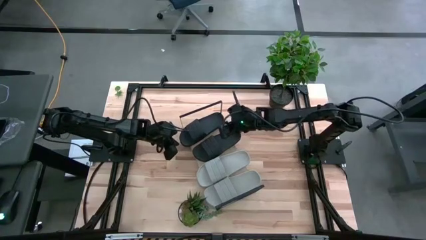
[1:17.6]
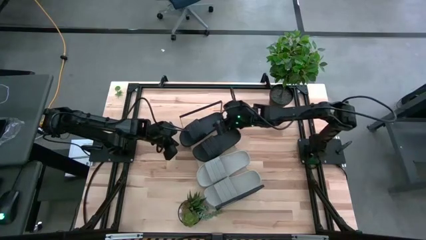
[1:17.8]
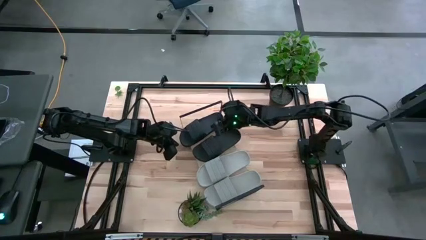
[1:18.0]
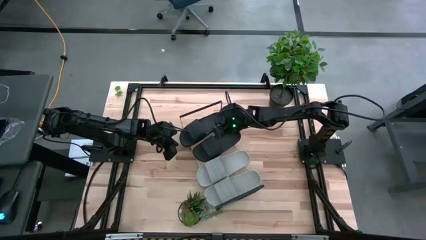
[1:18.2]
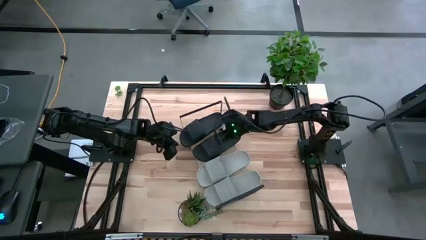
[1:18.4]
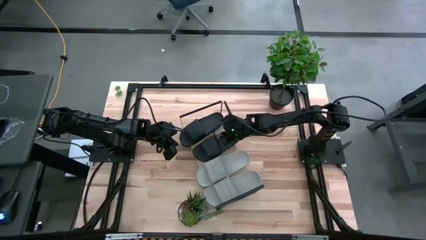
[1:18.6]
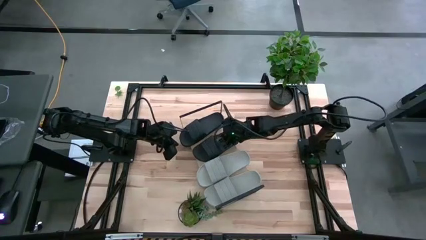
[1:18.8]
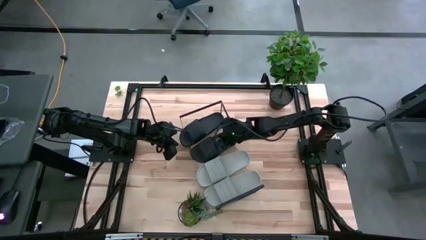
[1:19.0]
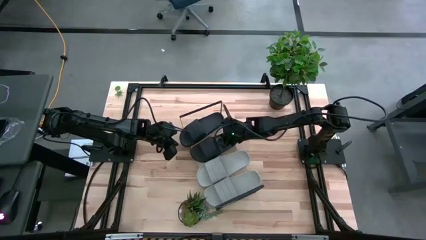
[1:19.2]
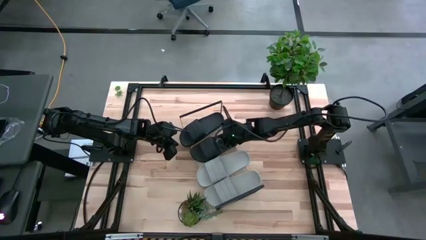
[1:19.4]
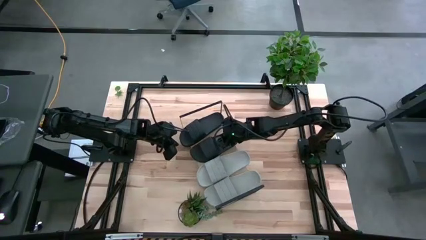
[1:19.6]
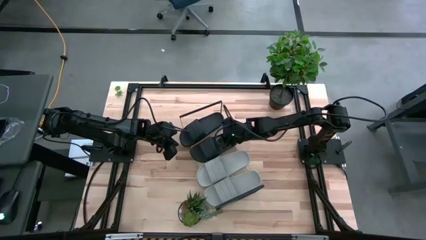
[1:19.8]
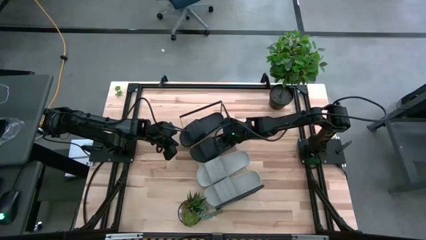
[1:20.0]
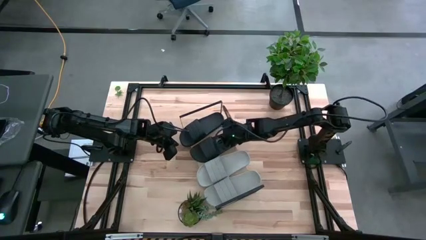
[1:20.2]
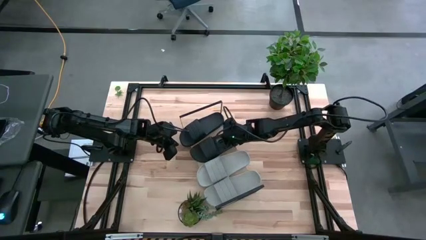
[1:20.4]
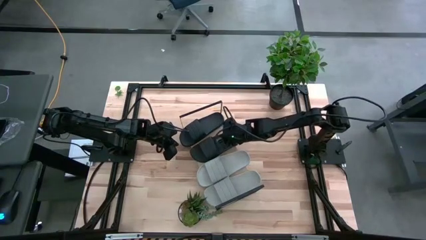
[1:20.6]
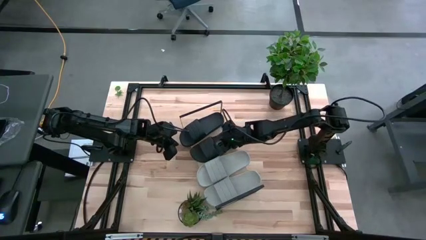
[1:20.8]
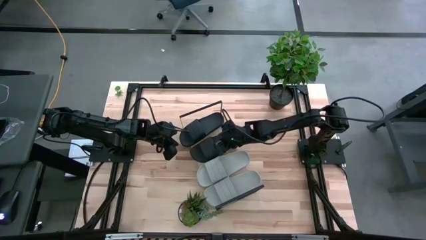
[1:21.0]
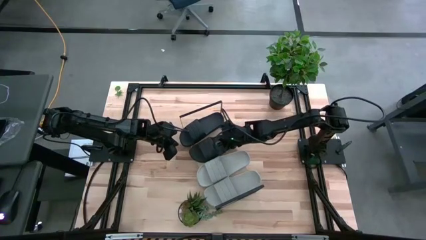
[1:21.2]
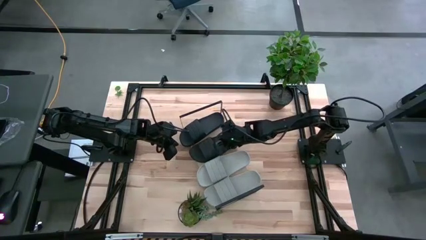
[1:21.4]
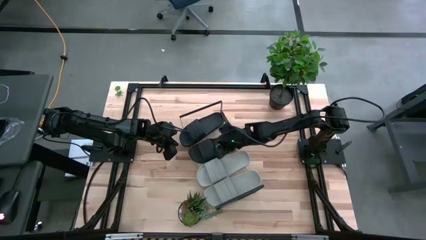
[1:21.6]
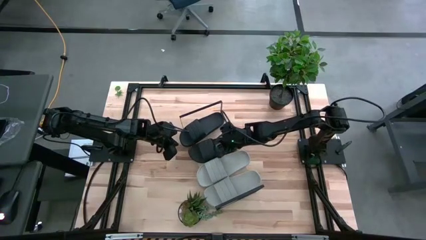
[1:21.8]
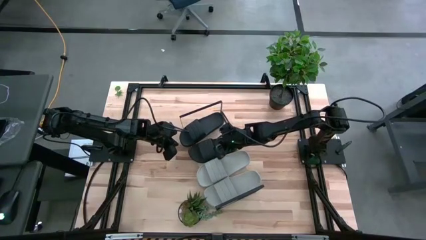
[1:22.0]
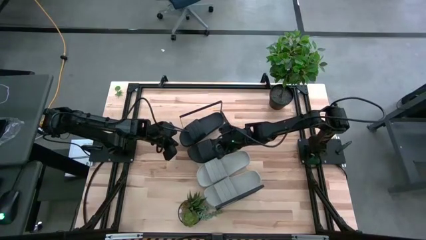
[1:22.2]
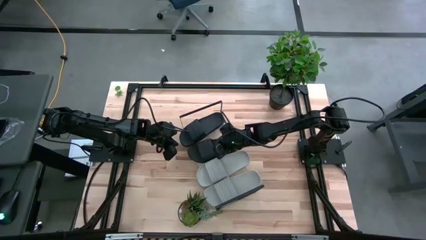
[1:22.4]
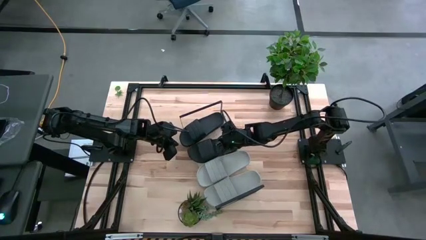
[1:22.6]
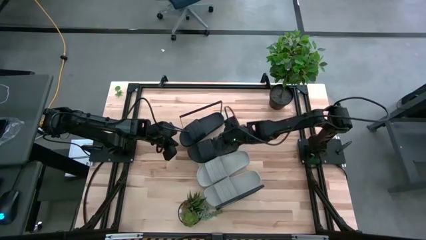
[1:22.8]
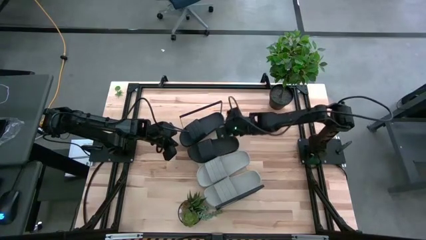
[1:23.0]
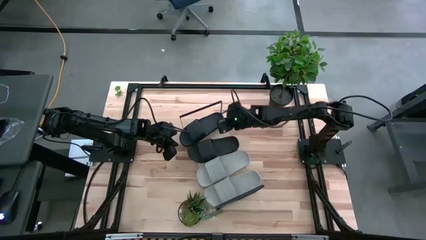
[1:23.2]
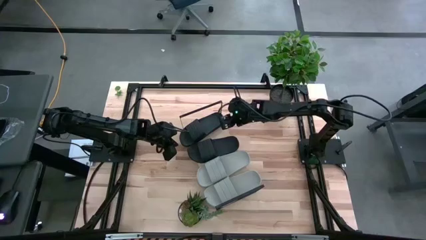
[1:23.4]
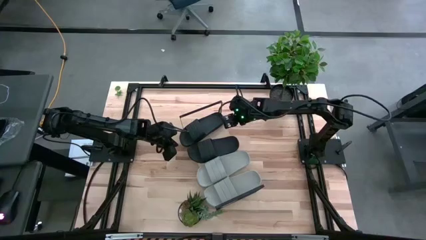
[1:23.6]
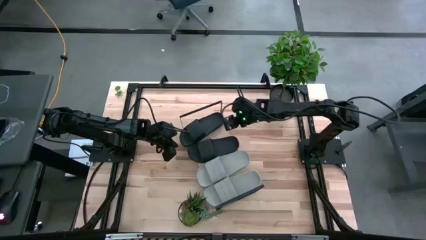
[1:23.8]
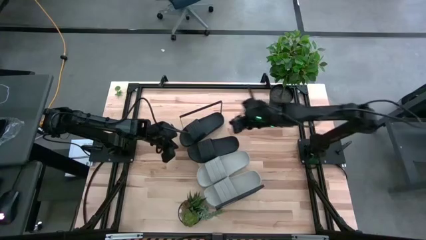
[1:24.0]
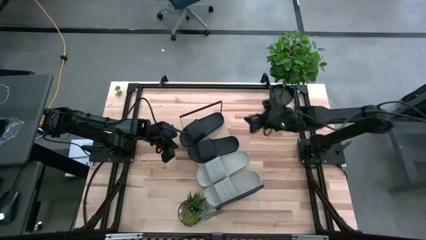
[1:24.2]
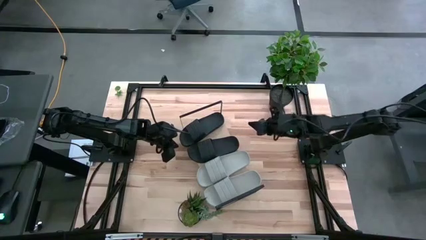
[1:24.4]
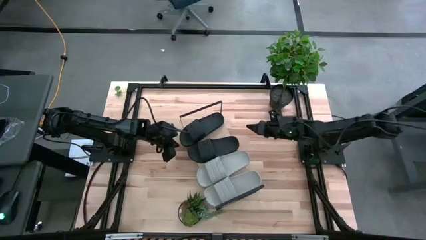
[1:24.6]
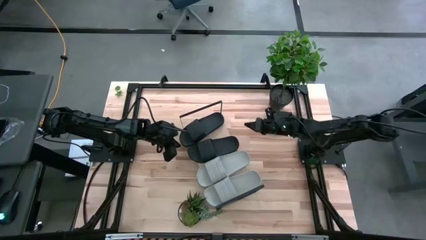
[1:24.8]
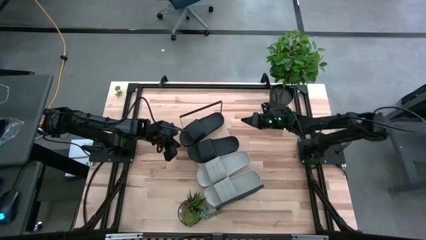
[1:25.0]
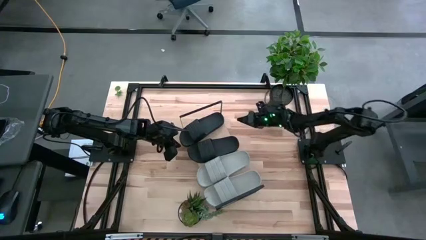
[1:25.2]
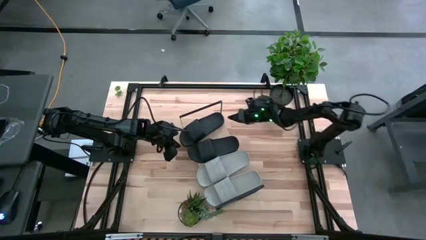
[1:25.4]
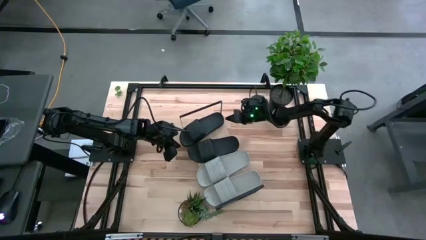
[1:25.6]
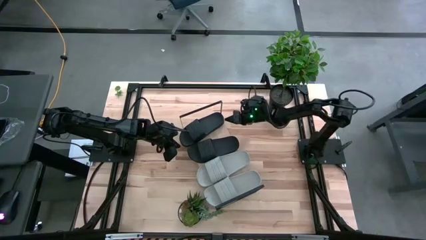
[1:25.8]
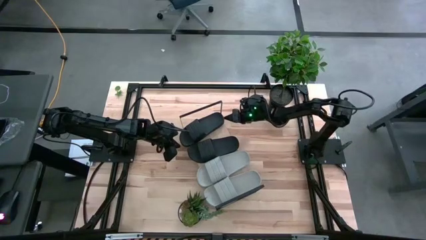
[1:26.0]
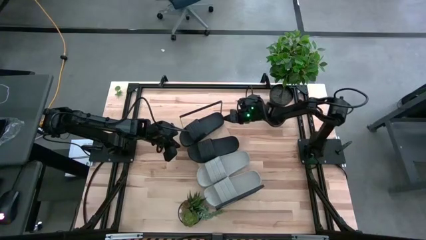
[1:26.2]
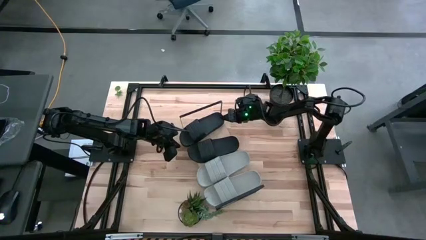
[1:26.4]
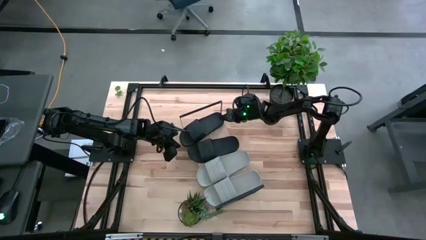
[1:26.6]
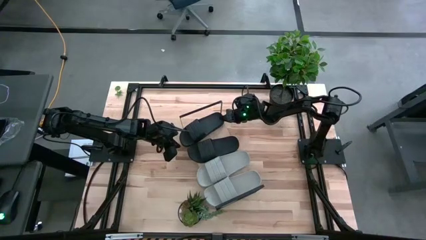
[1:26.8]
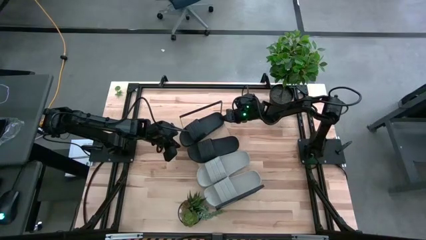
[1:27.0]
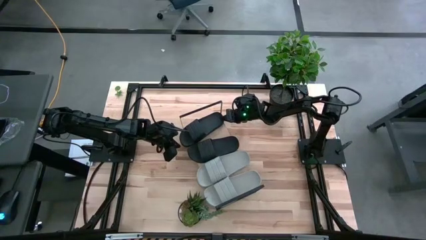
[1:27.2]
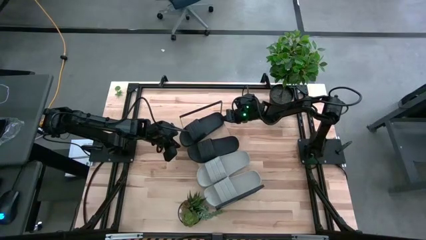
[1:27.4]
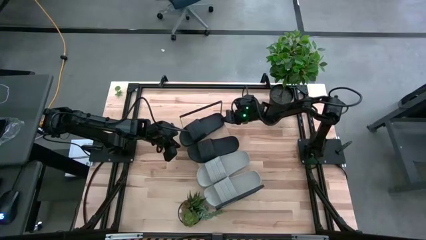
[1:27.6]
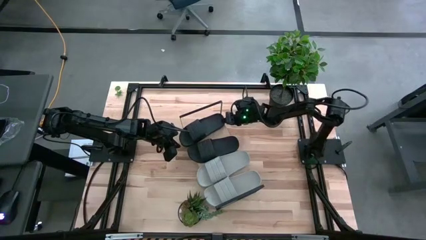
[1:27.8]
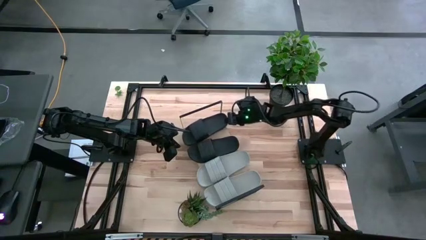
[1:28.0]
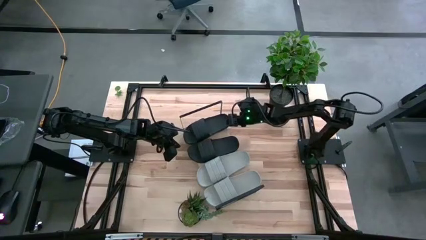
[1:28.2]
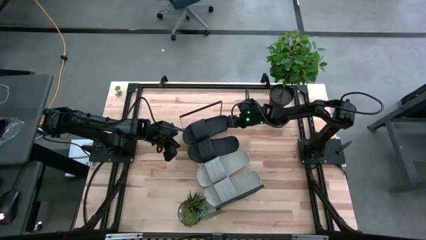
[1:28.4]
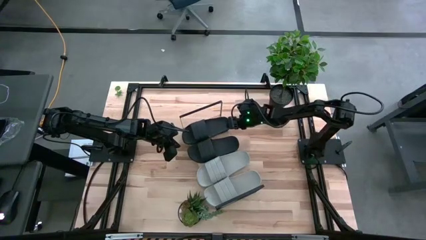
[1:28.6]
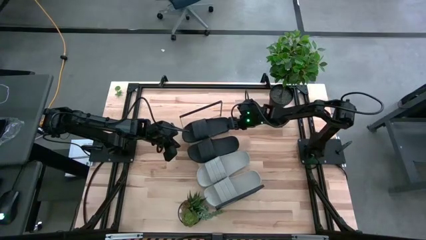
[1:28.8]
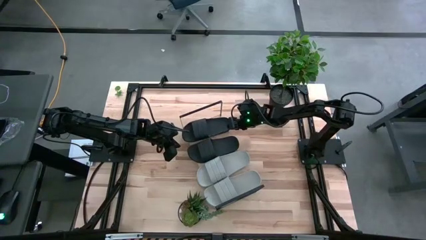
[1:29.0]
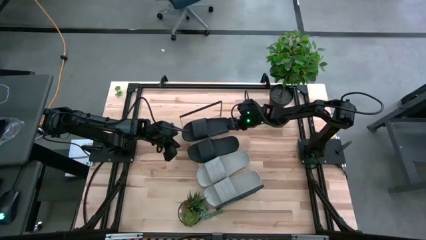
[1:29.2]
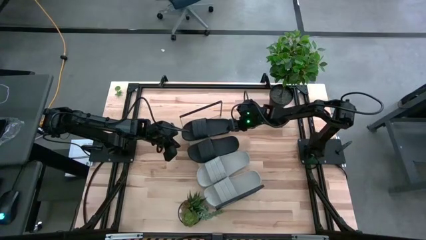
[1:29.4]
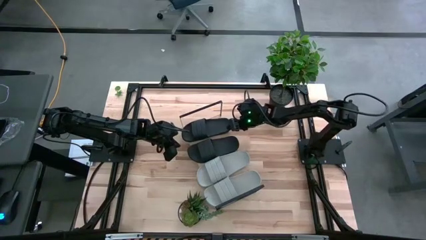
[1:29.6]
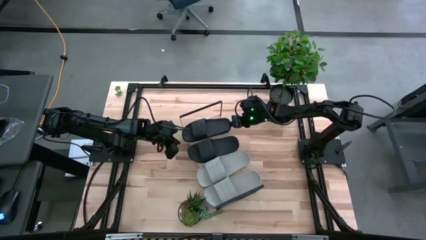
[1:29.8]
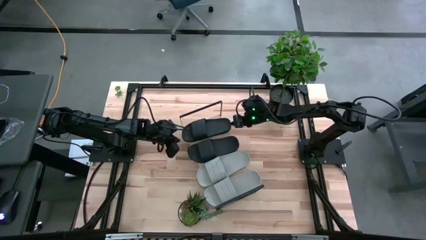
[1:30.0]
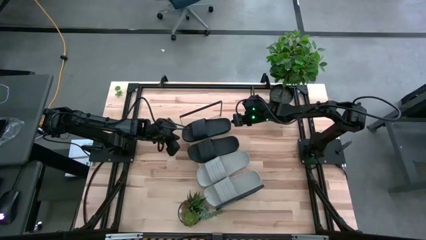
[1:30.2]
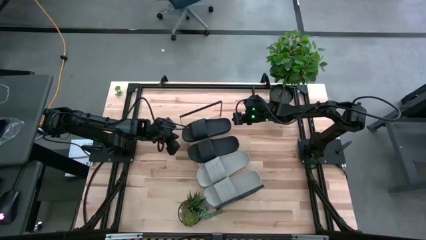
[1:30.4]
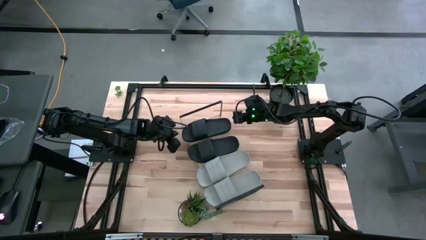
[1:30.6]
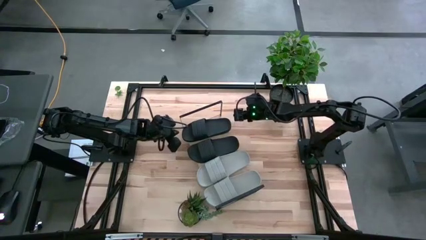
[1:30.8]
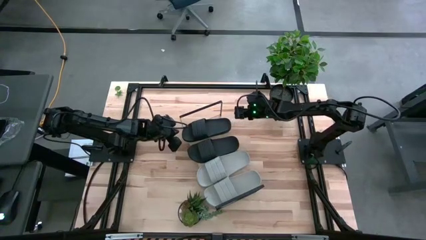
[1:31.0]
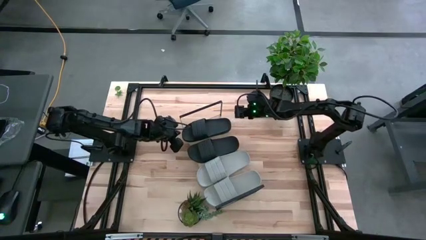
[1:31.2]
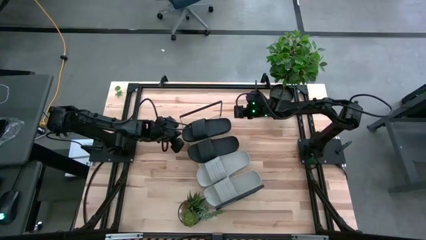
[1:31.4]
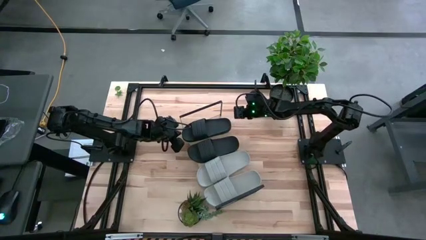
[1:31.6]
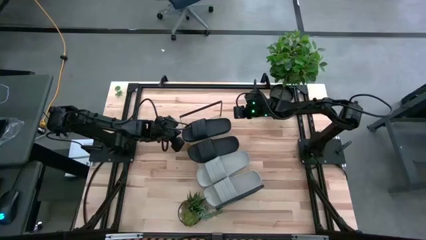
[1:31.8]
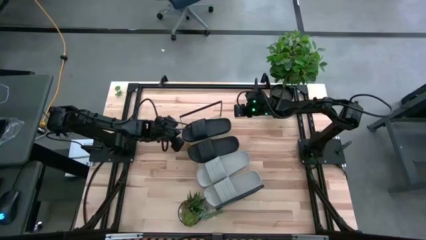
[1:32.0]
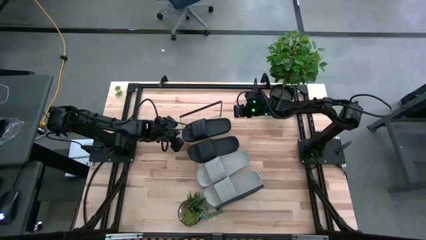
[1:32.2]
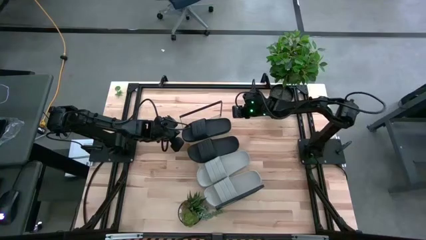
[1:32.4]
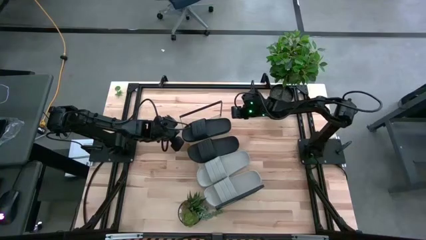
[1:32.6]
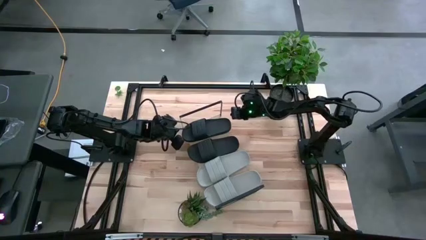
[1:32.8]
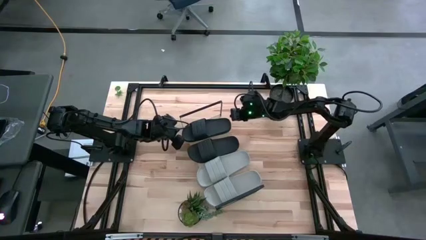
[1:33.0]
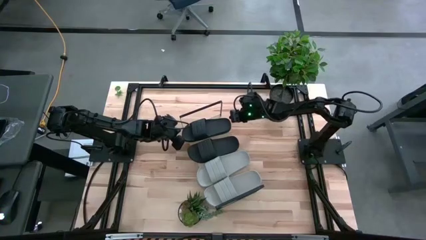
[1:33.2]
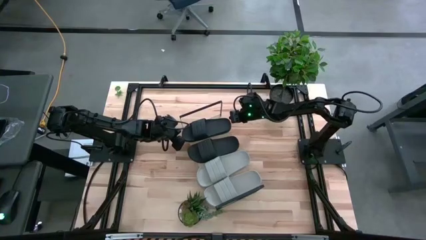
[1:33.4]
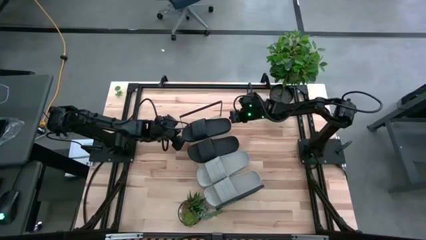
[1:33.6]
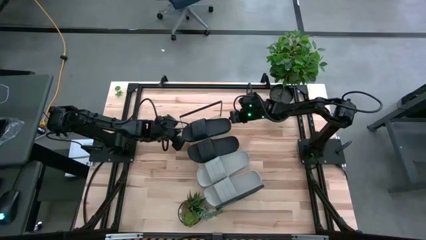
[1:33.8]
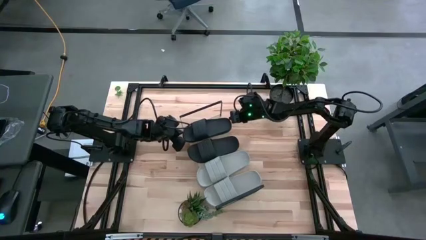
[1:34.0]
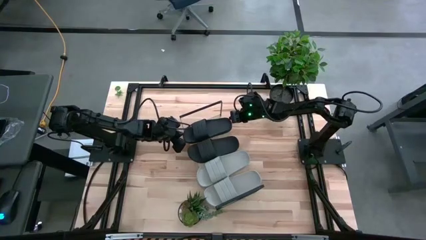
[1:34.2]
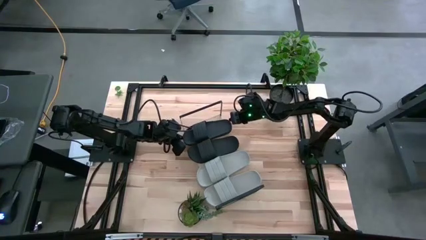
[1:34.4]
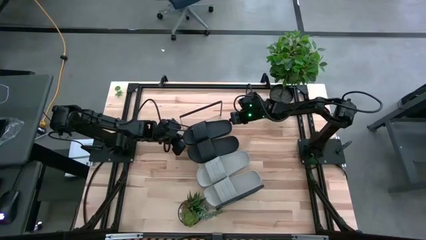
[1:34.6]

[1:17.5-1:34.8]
Task: Pick and place slides into the shelf
Adjust the black slippers on the shelf
